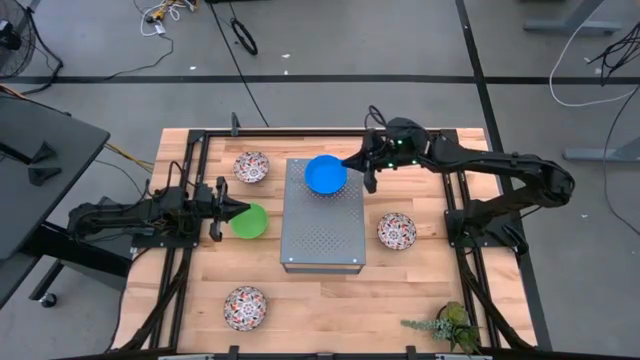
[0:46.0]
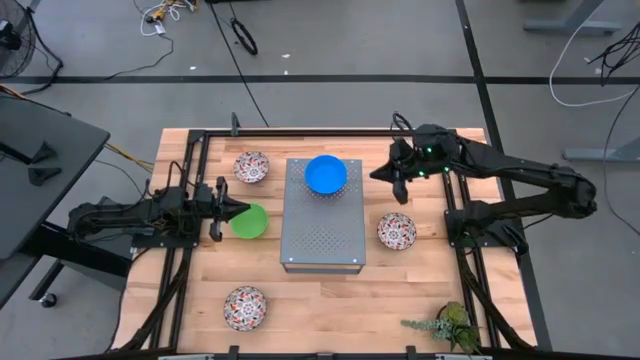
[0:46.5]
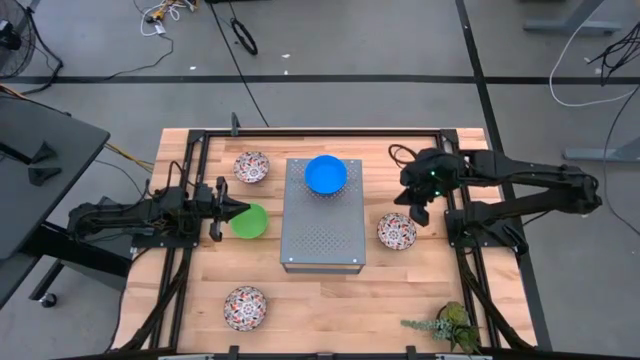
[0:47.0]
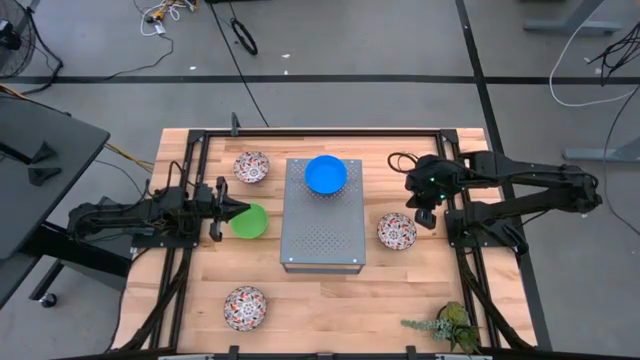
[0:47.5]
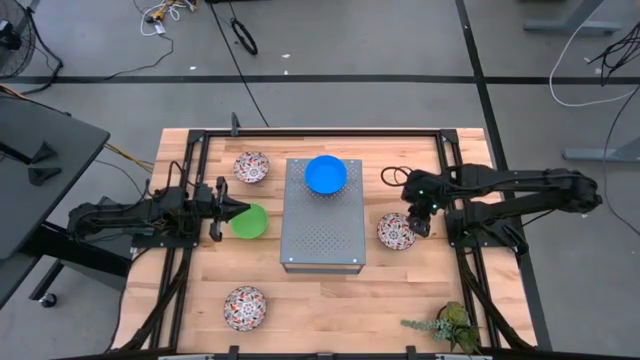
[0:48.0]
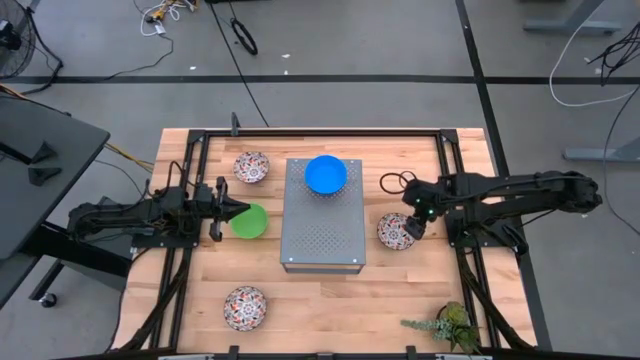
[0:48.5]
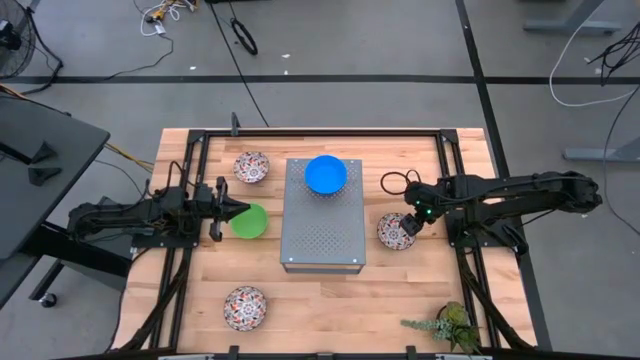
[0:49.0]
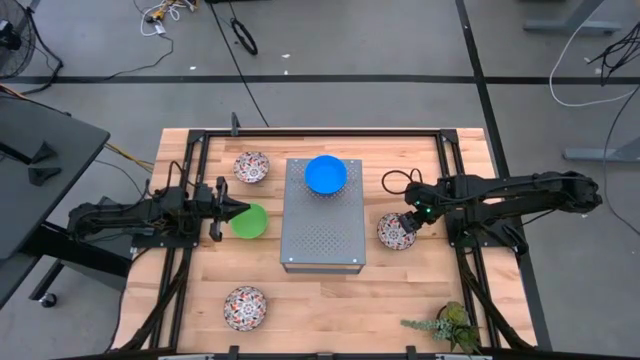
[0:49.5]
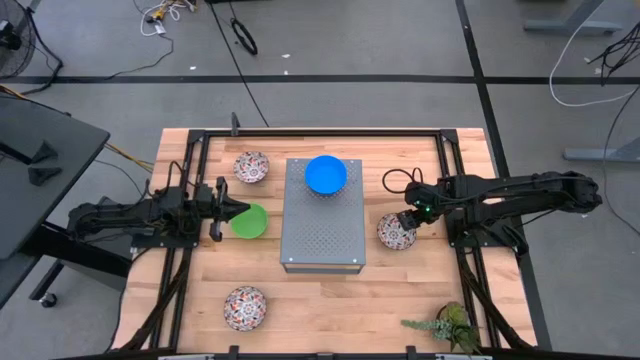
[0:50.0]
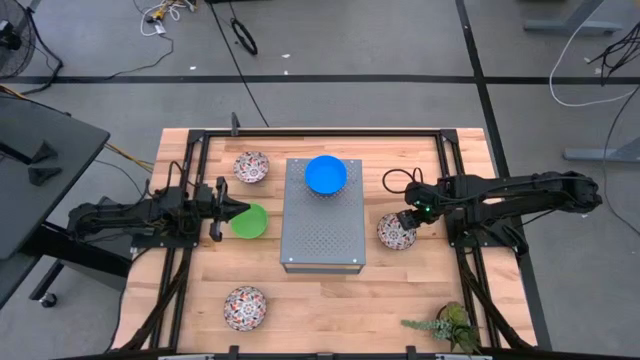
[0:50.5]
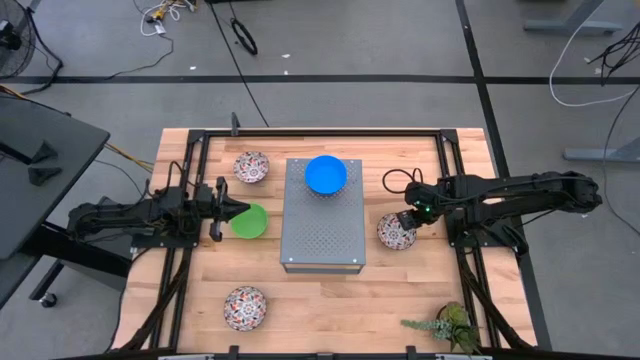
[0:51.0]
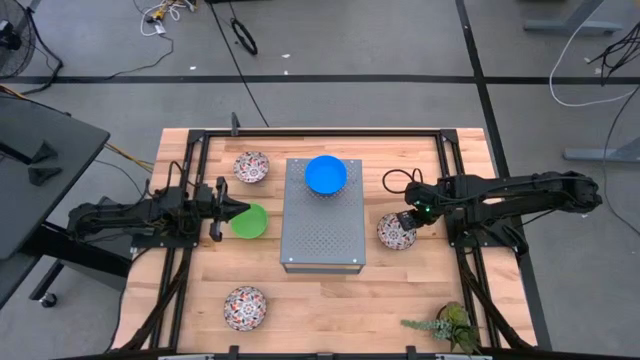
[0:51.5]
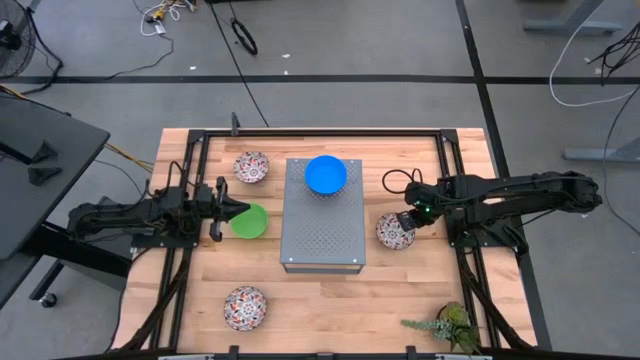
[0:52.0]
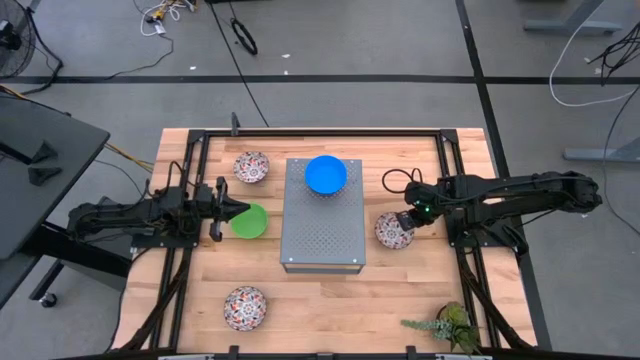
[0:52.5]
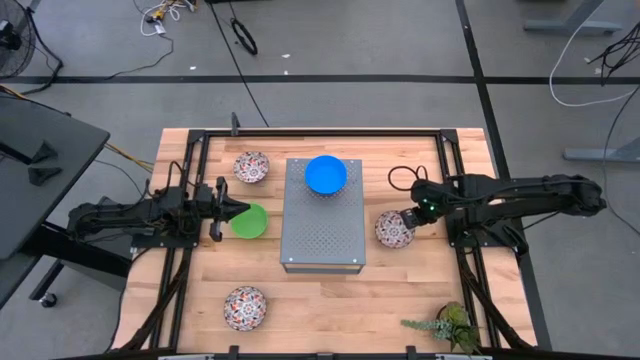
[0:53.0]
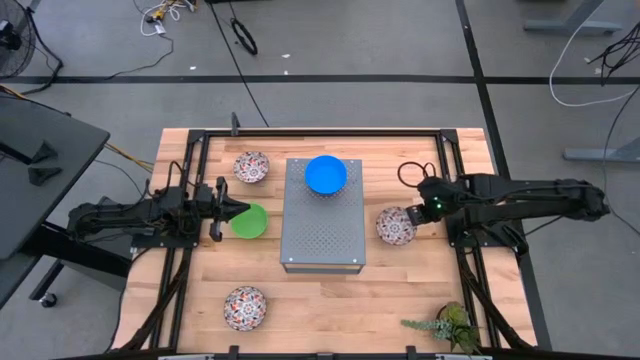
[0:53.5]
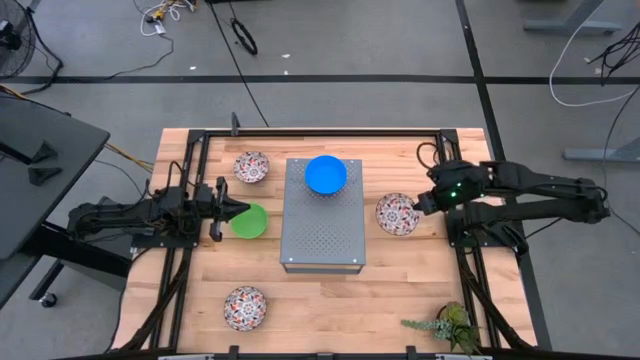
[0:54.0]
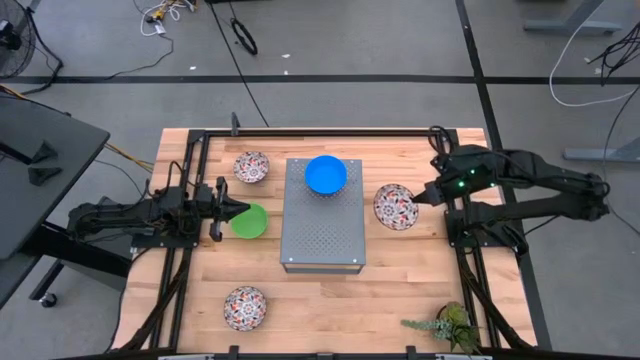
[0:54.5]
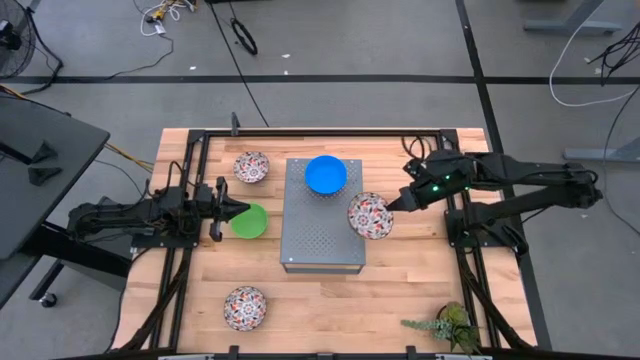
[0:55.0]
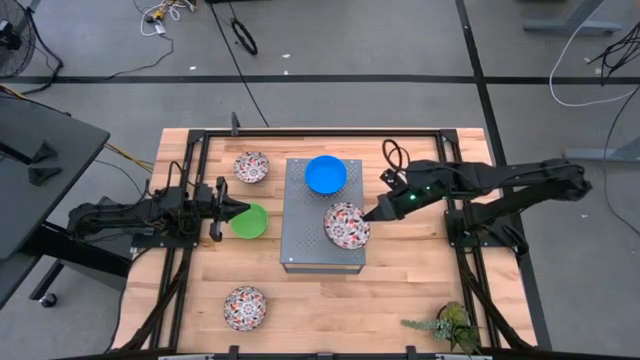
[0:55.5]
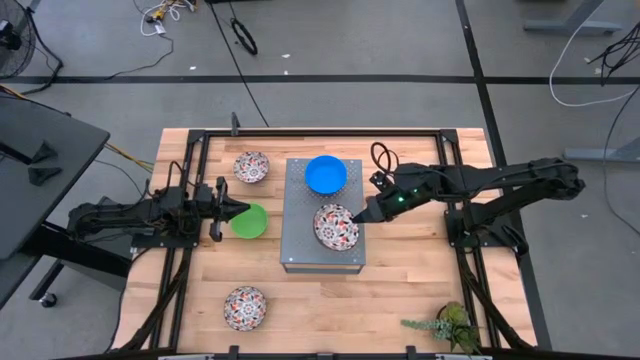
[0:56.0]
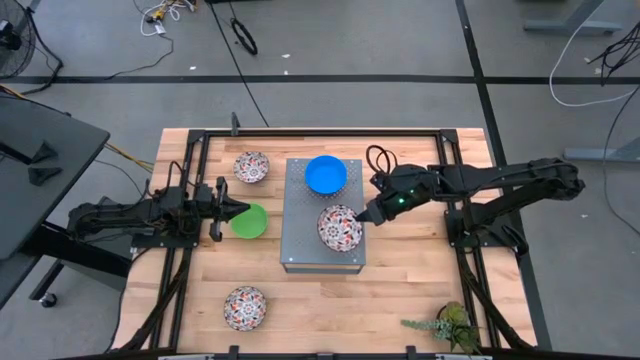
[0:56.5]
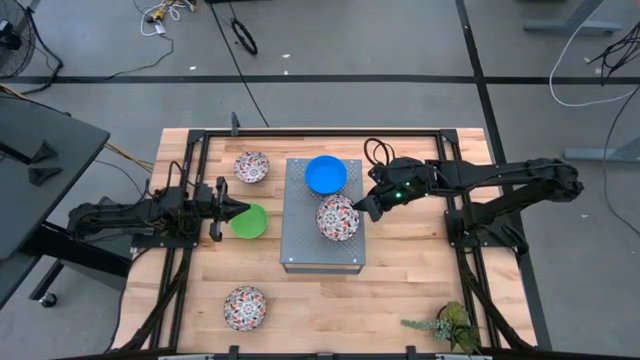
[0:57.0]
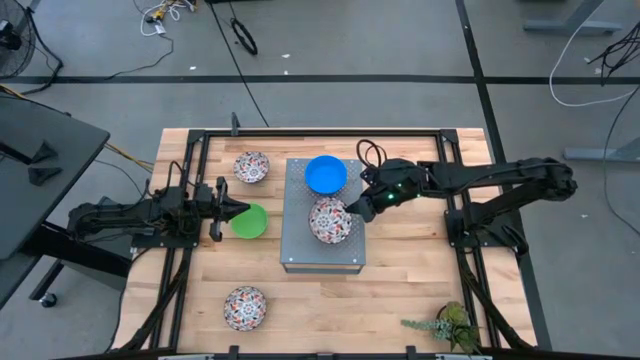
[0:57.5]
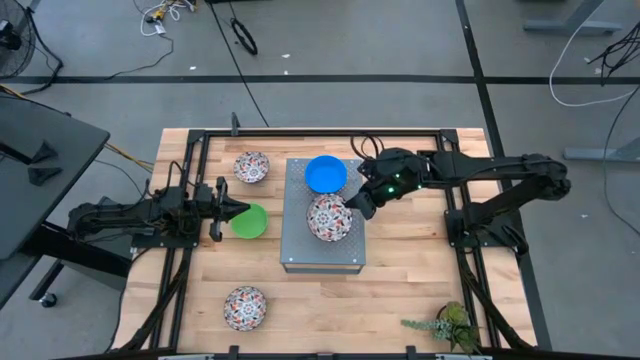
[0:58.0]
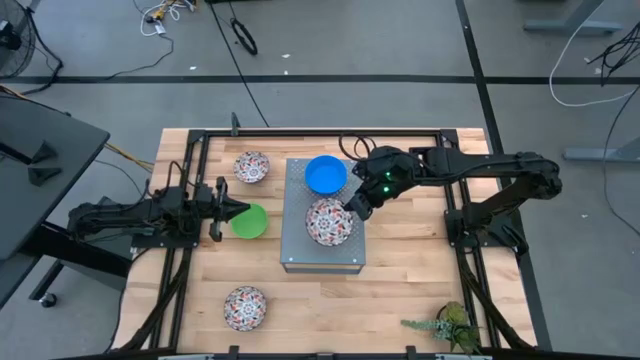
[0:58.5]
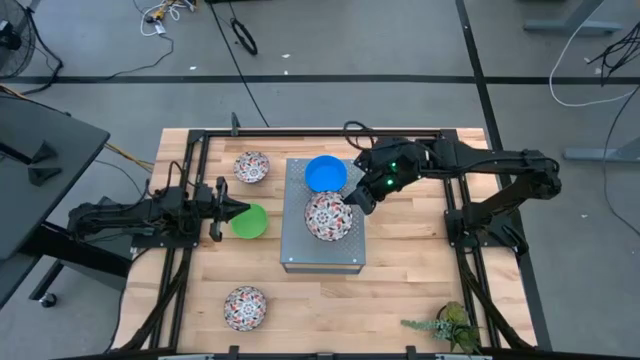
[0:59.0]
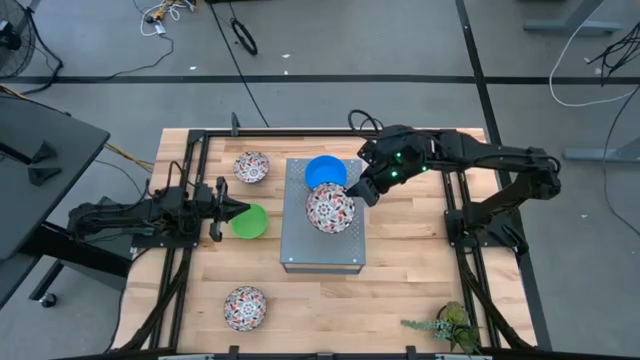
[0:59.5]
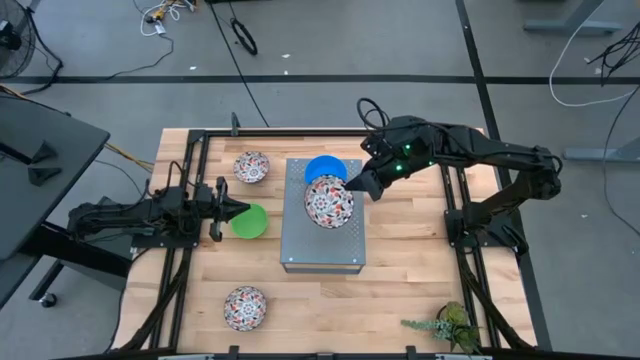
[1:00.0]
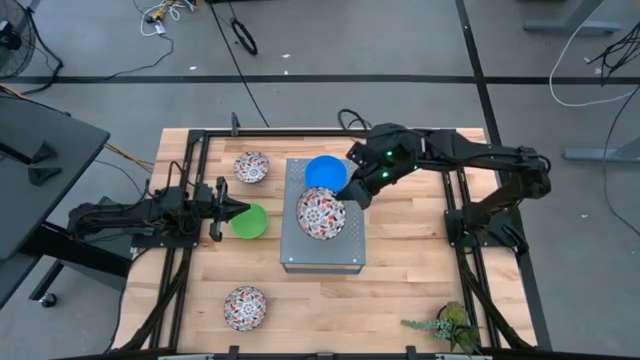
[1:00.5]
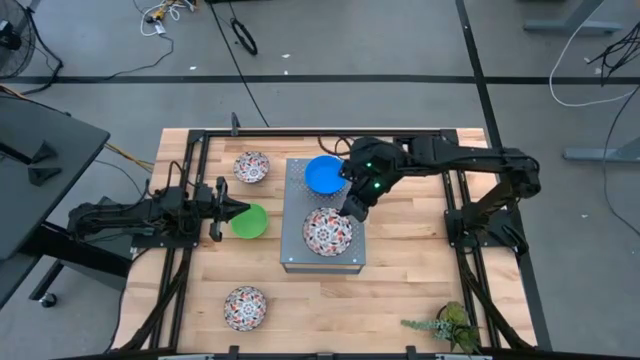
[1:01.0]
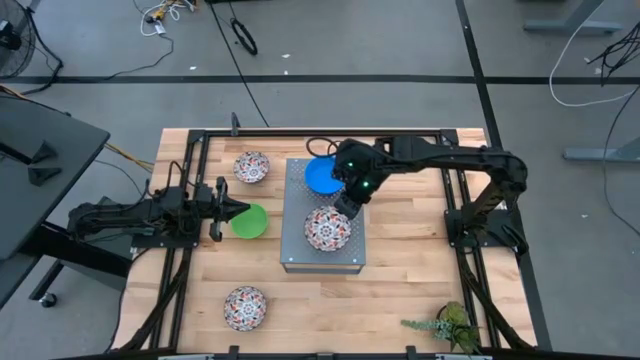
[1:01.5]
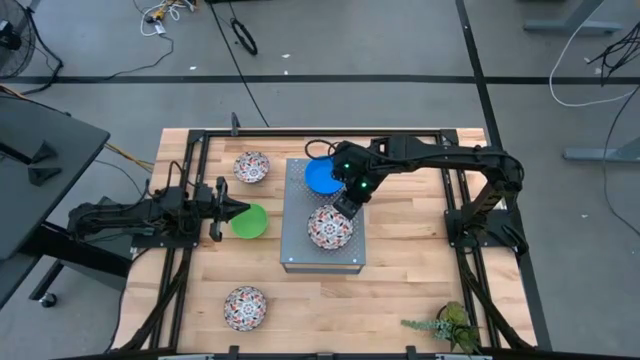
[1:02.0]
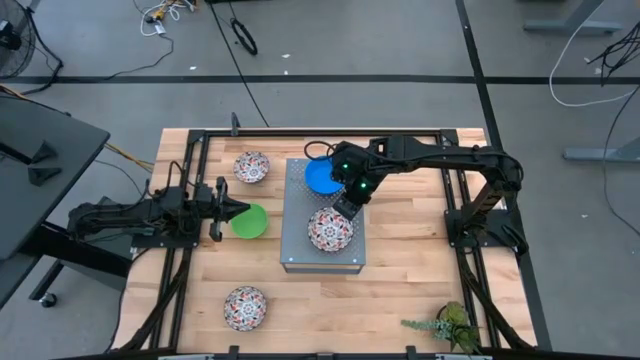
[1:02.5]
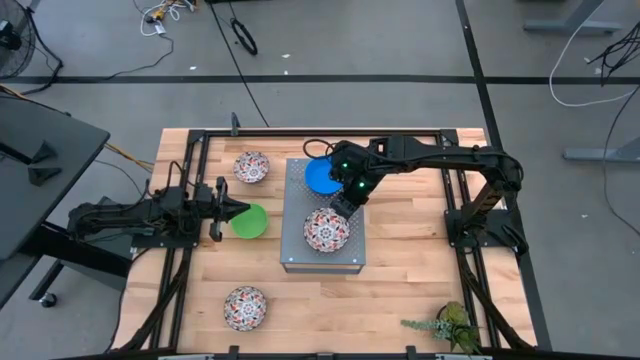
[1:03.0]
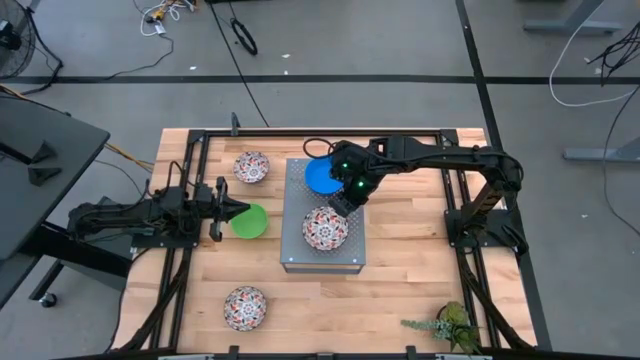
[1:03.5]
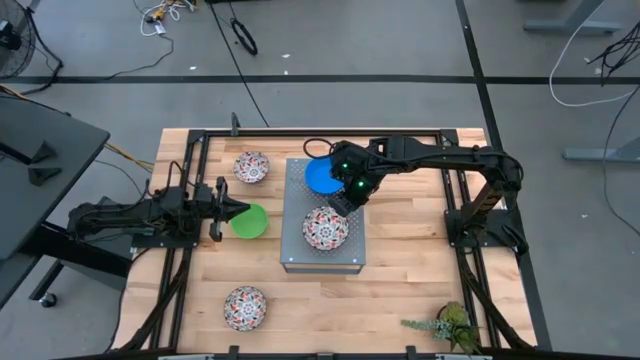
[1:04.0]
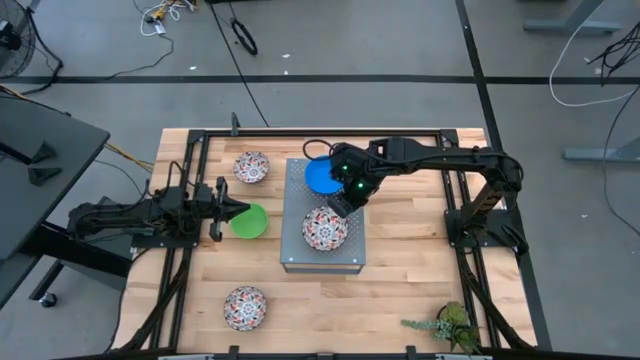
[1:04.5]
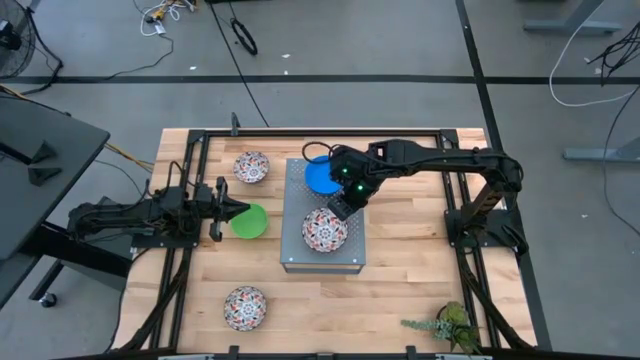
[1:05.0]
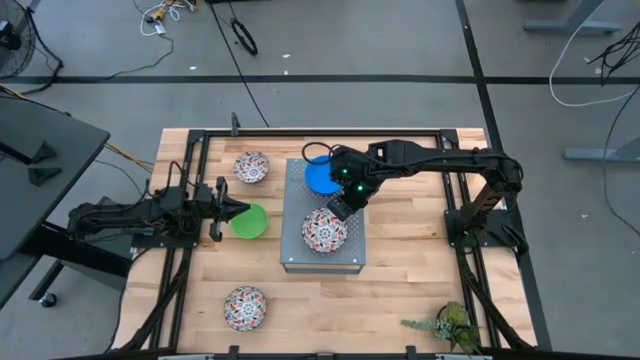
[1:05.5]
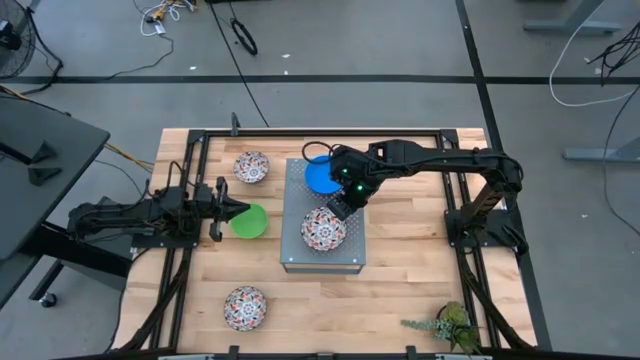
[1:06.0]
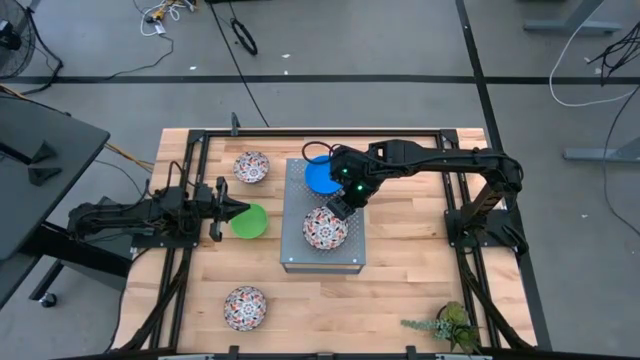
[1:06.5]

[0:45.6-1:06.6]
Task: Pick & Place Mini bowls
Put the middle white patterned bowl on the shelf
